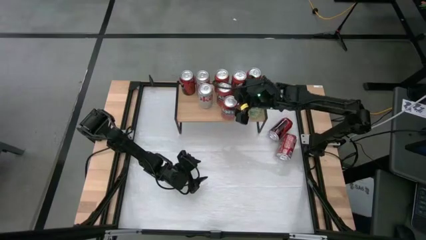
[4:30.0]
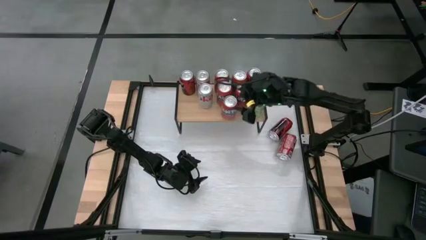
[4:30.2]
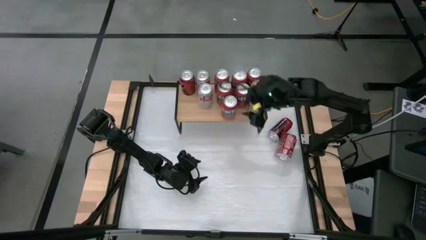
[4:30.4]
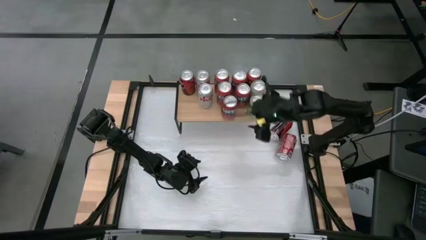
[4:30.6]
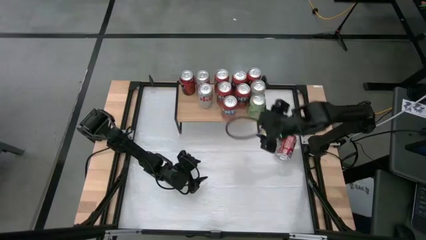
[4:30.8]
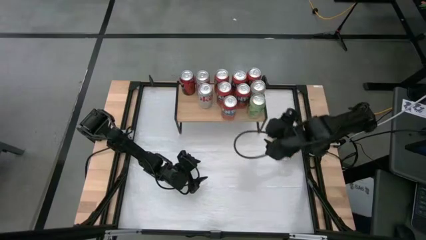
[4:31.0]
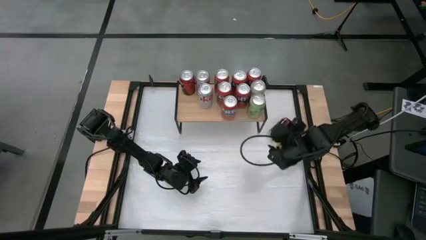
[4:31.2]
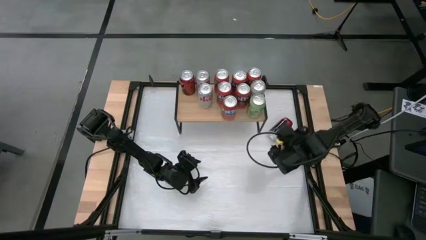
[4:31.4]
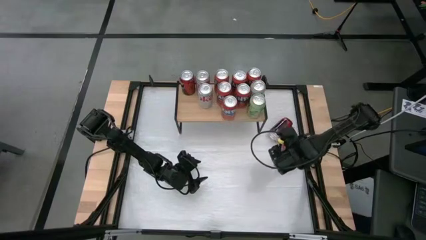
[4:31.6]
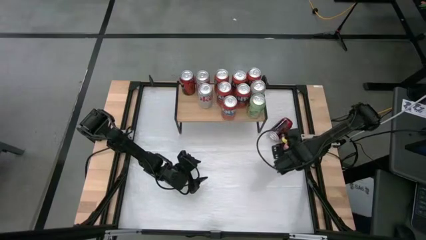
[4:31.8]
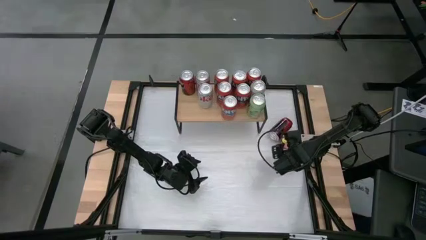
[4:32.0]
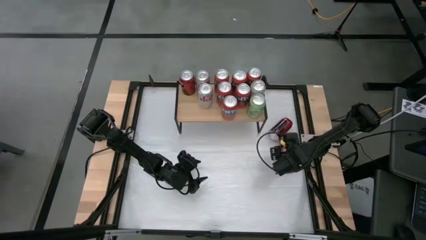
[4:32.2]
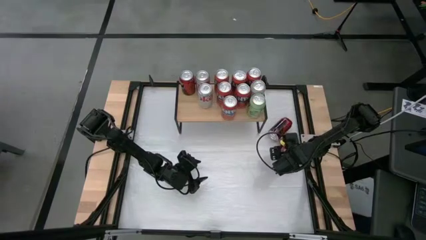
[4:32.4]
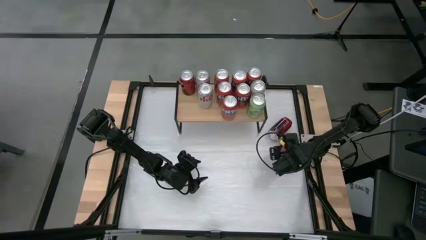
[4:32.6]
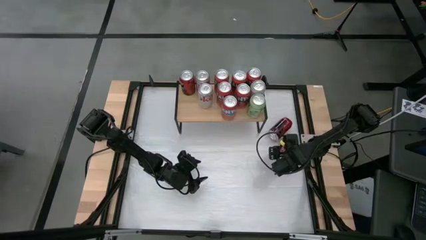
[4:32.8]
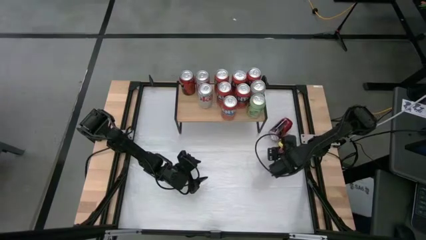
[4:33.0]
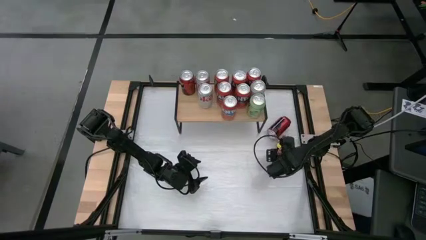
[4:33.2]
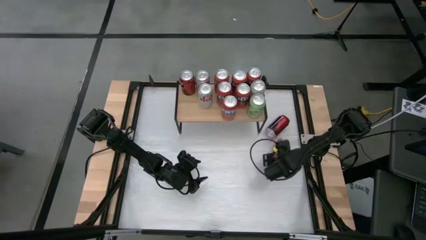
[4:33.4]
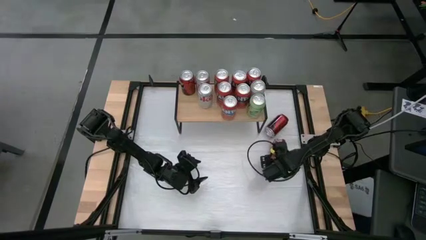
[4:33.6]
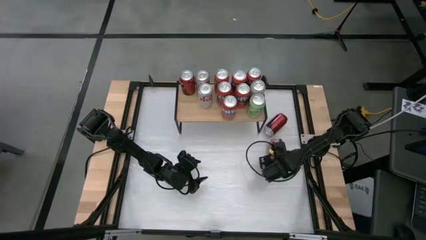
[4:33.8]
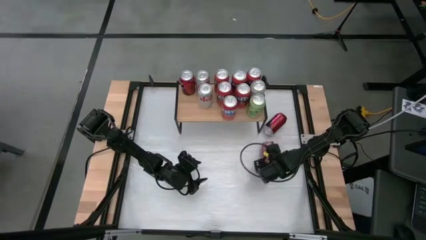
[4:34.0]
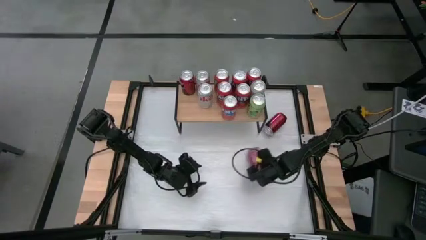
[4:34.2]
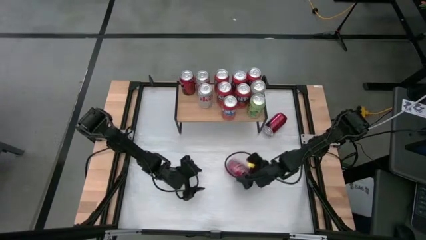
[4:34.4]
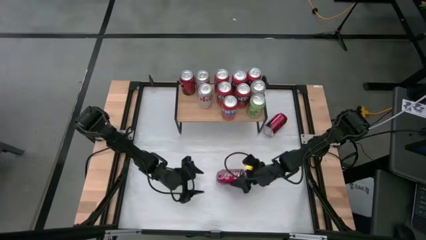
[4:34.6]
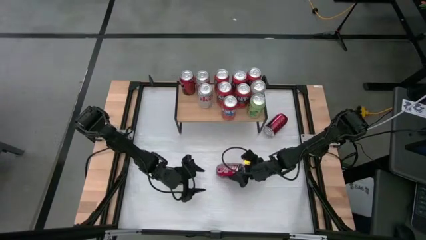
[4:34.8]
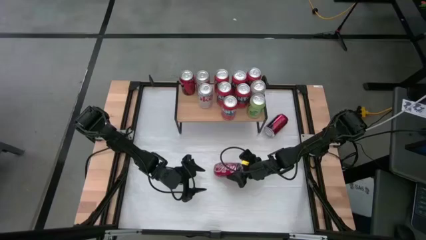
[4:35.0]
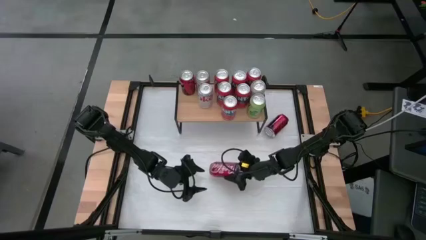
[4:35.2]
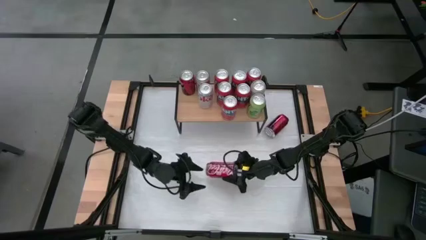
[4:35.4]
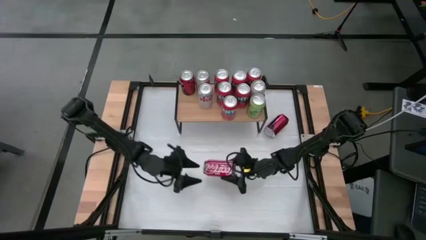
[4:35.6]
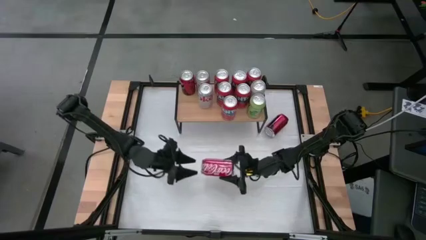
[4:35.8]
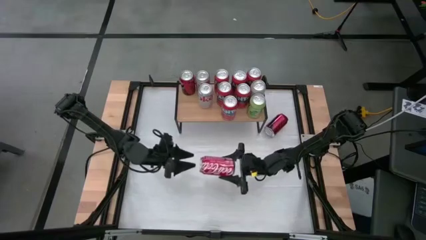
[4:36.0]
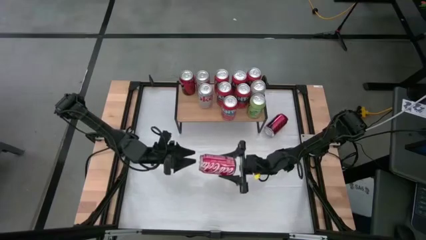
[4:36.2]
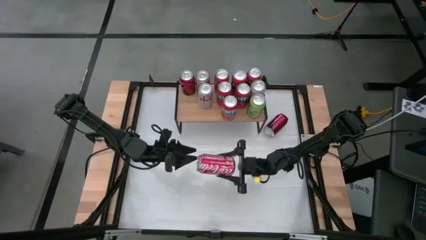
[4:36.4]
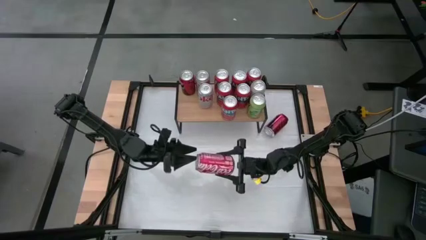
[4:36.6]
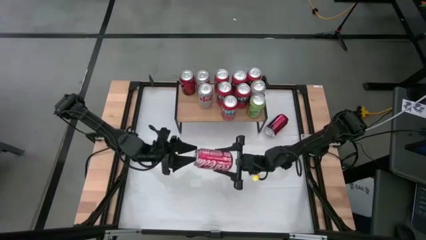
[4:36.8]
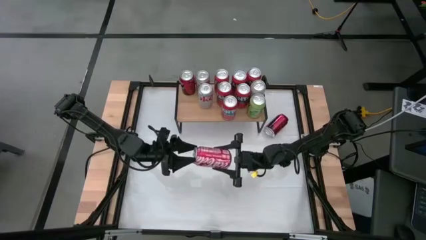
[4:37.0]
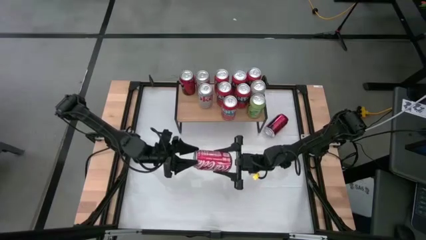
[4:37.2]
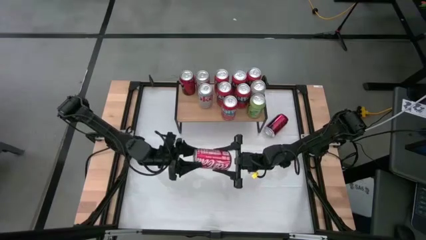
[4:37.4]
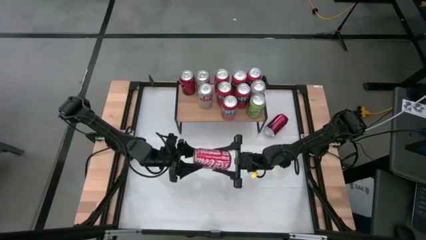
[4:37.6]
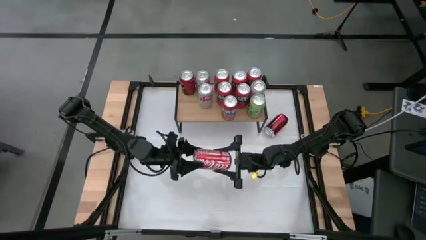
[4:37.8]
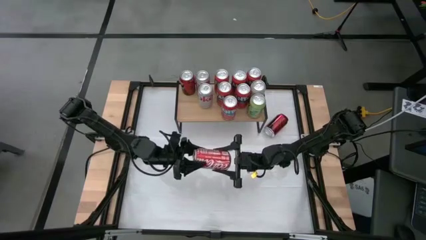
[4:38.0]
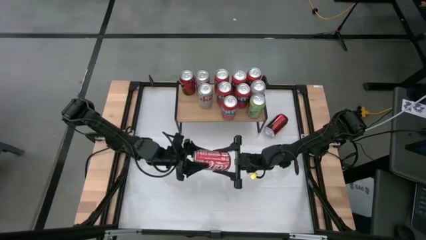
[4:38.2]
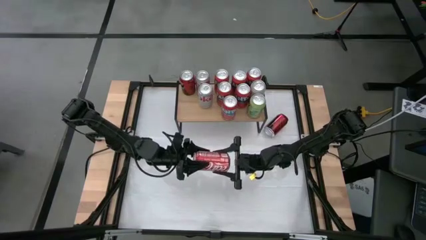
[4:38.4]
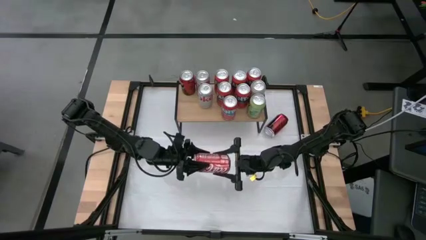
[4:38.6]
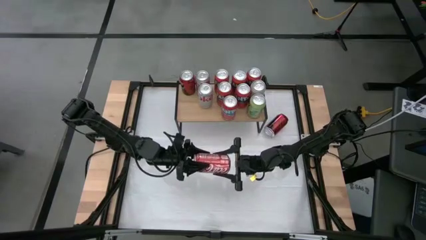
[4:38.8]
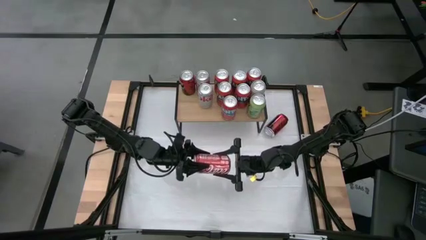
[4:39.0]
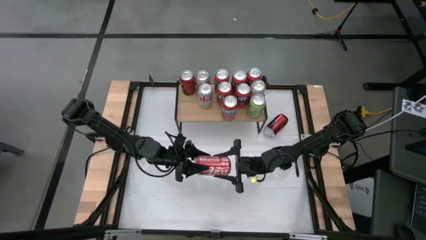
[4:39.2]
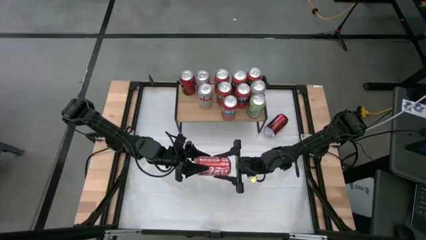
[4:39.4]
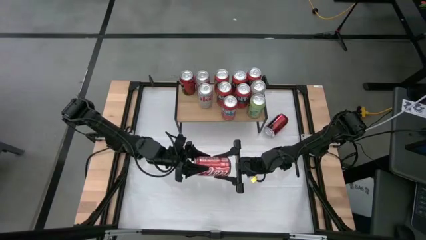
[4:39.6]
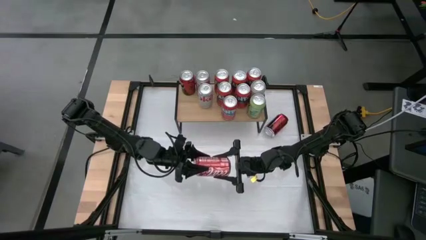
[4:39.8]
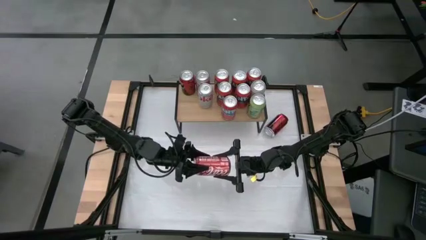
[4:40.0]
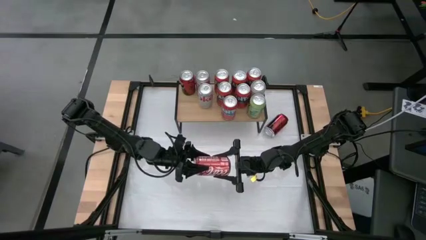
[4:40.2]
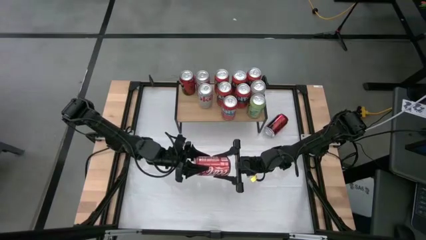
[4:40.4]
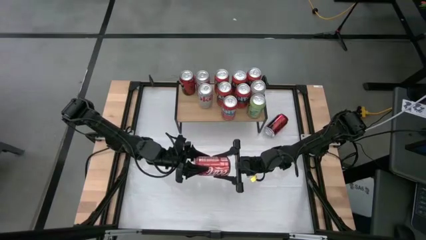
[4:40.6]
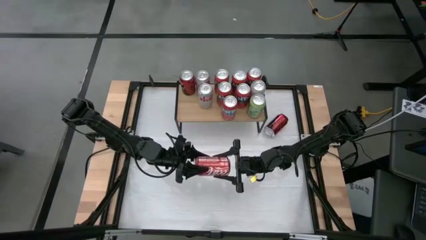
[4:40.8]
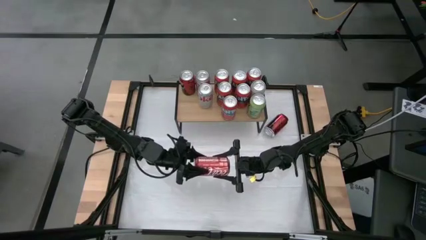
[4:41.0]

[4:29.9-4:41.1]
Task: Place canned beverage on shelf
Put the red white soda can on the shelf aligned with the other red white soda can

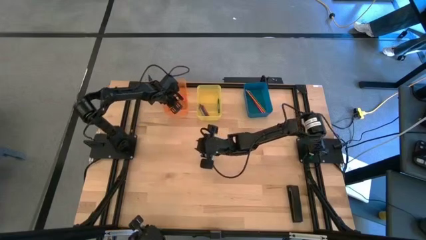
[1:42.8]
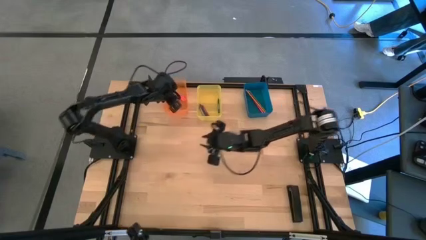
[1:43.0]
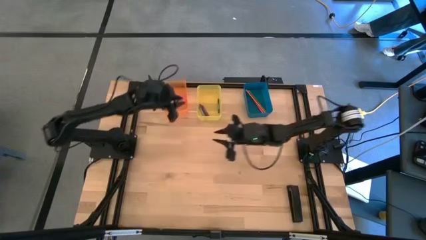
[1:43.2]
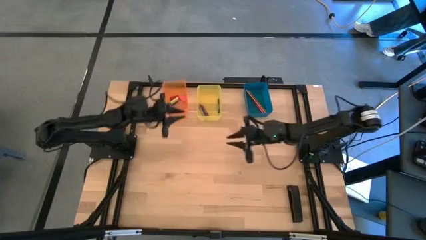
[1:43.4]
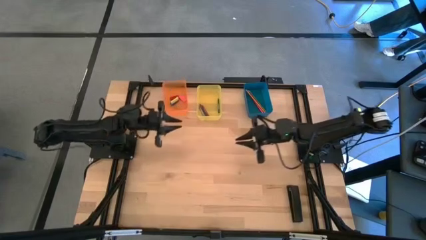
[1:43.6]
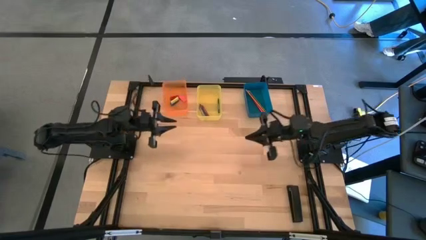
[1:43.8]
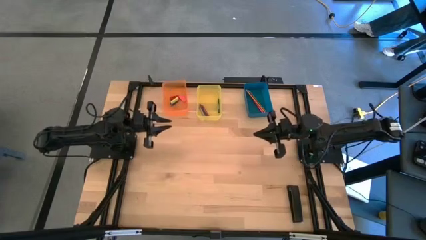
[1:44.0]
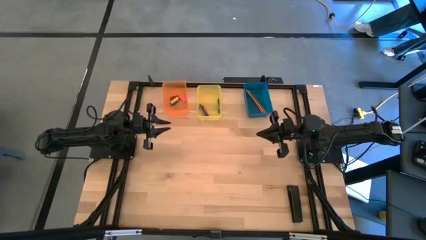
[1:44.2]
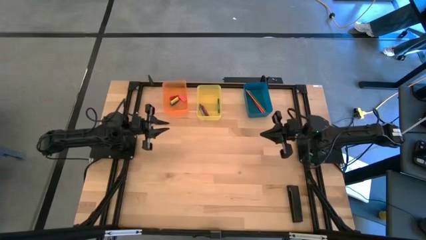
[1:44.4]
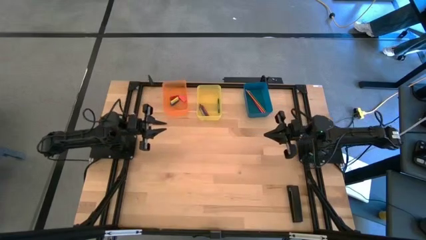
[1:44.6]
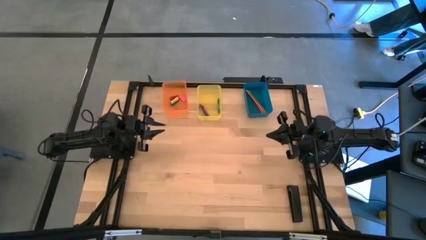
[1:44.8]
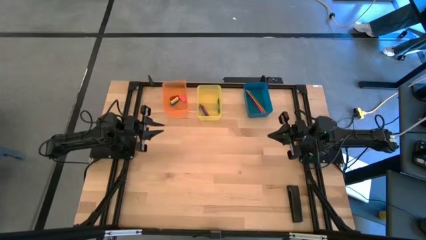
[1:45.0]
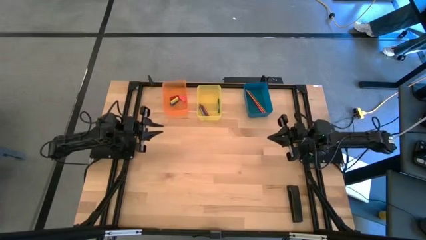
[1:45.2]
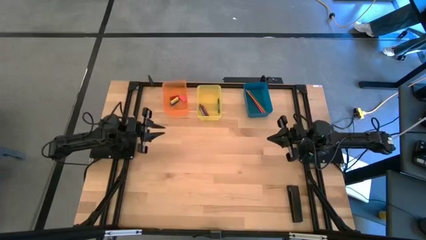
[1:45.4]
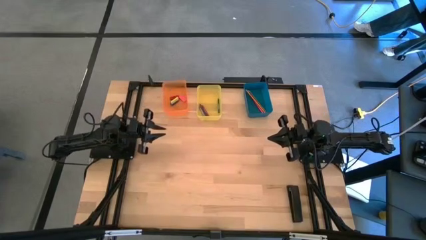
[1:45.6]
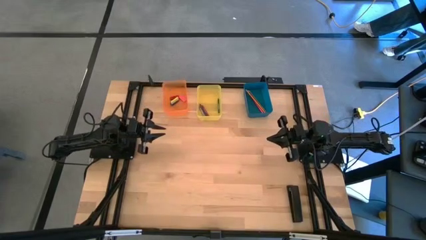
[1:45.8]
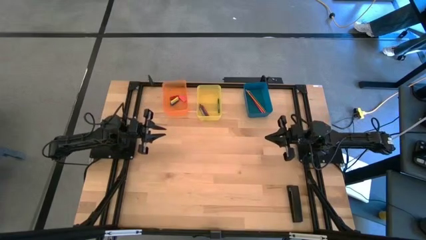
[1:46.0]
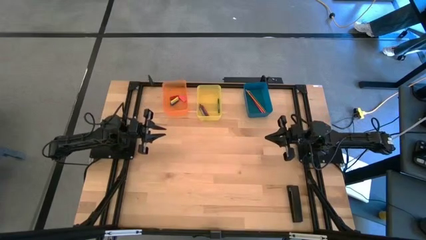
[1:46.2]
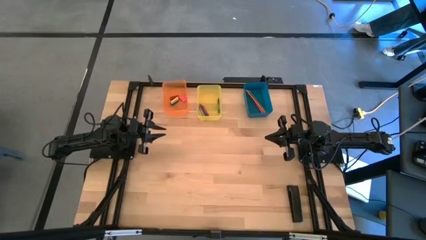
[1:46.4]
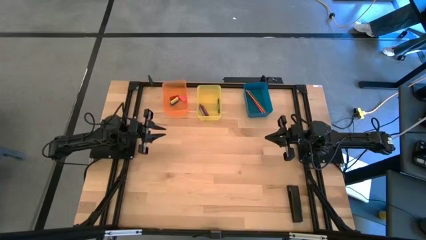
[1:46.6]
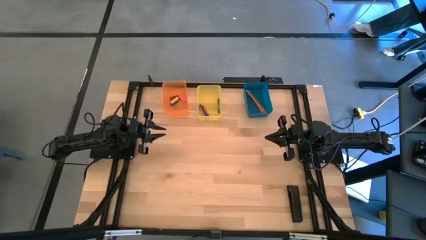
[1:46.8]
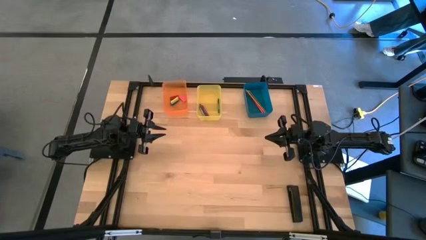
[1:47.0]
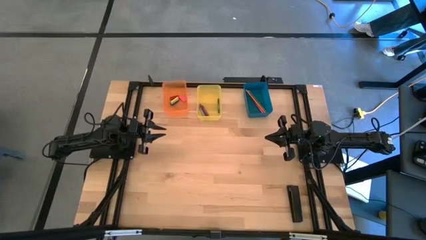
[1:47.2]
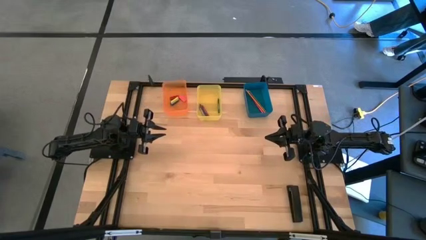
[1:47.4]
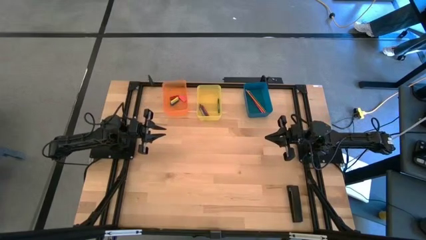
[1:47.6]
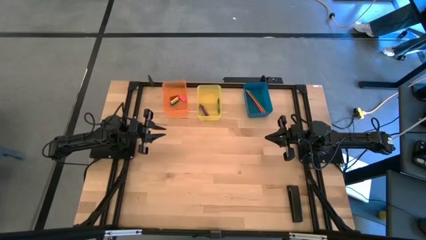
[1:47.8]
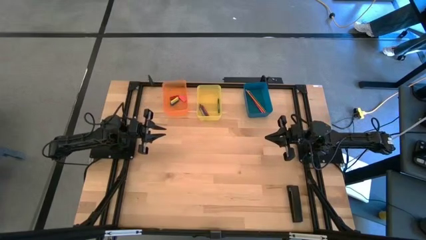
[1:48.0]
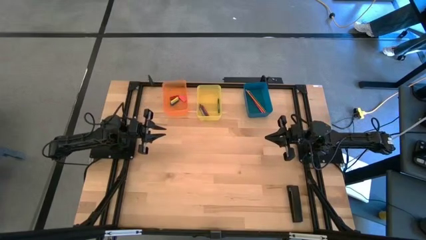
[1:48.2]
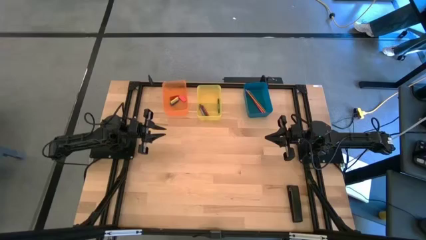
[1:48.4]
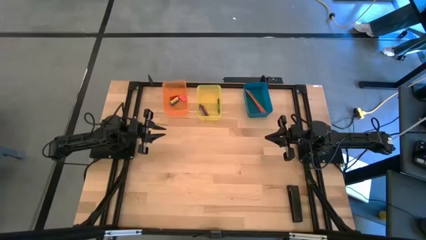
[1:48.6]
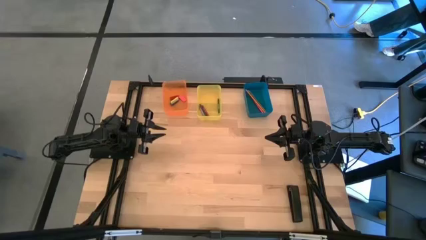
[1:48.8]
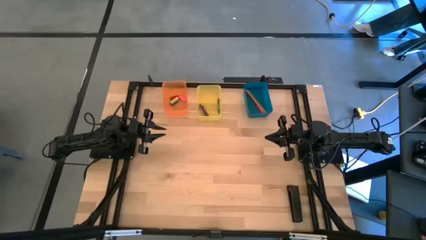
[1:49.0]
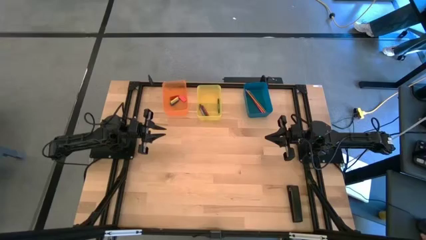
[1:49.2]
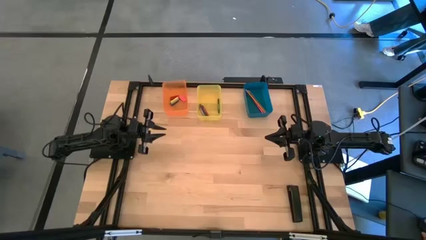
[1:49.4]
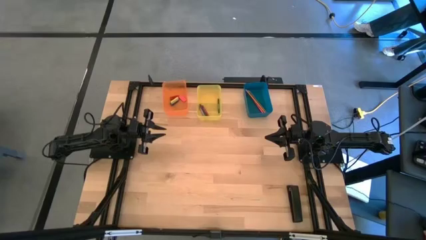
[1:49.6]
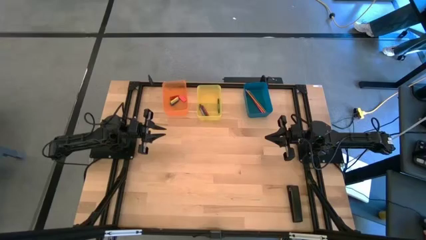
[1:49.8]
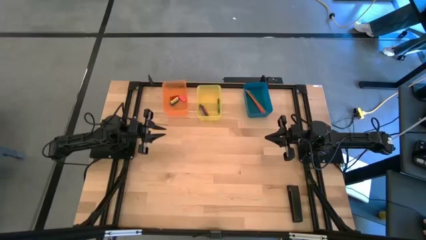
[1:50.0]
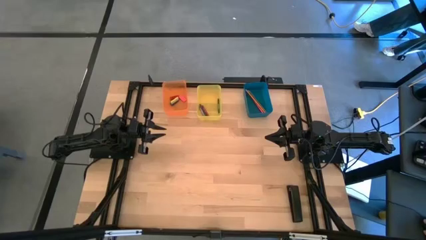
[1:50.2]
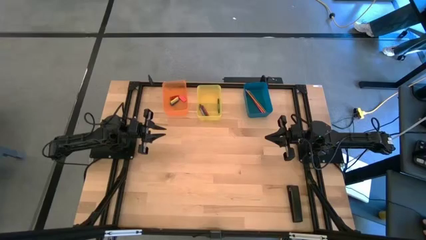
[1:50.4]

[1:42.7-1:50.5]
Task: Sort crayons/erasers/pens/pencils in bins
Return to Home Position
